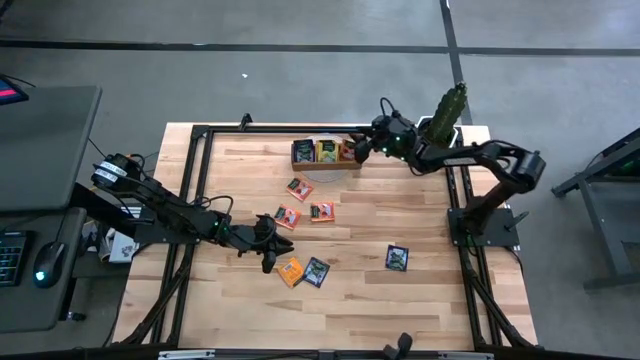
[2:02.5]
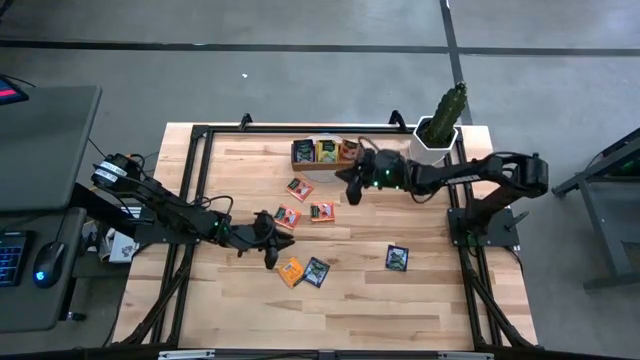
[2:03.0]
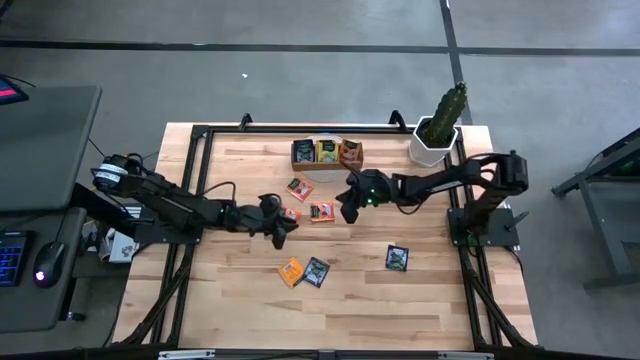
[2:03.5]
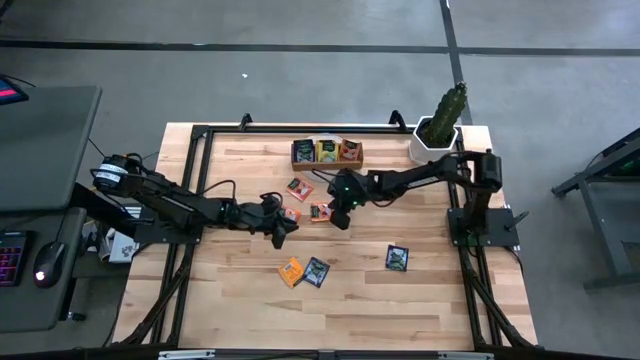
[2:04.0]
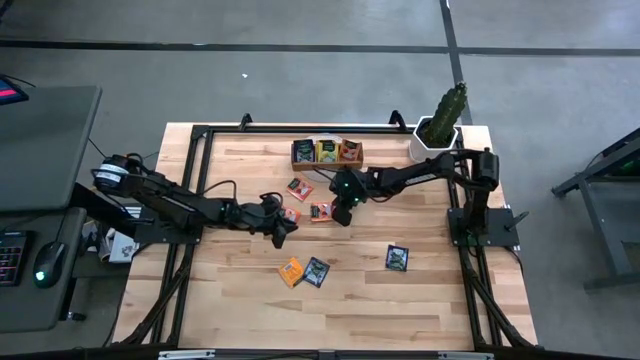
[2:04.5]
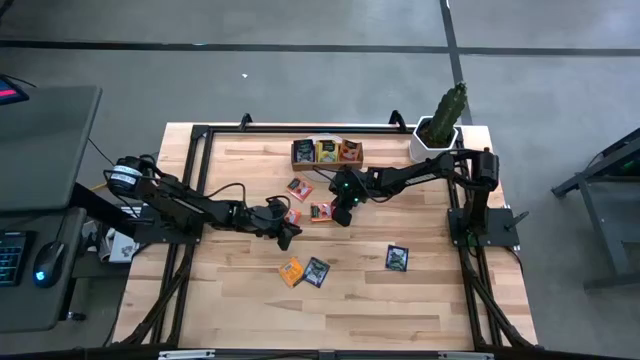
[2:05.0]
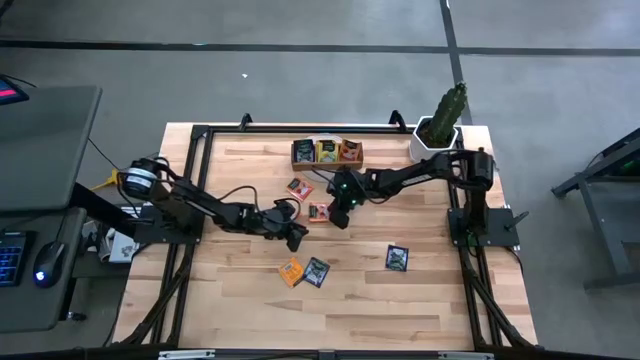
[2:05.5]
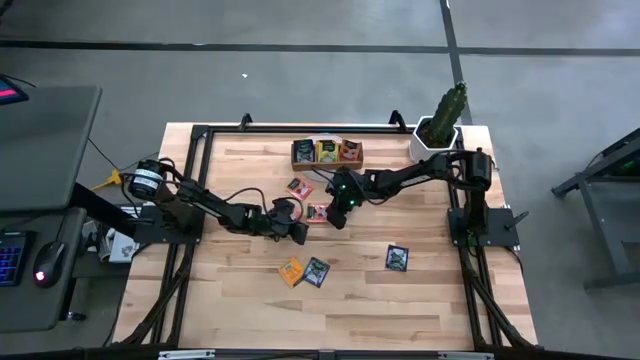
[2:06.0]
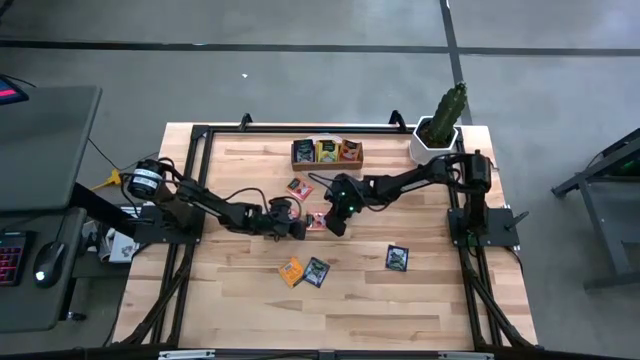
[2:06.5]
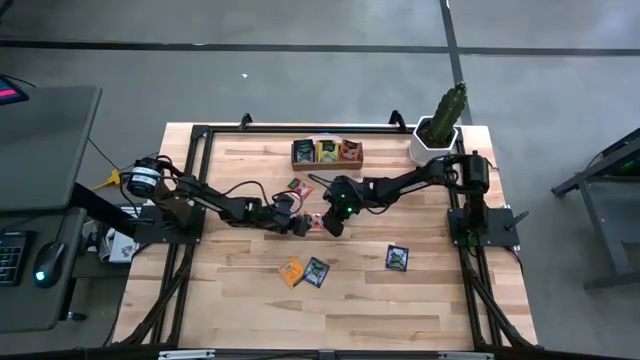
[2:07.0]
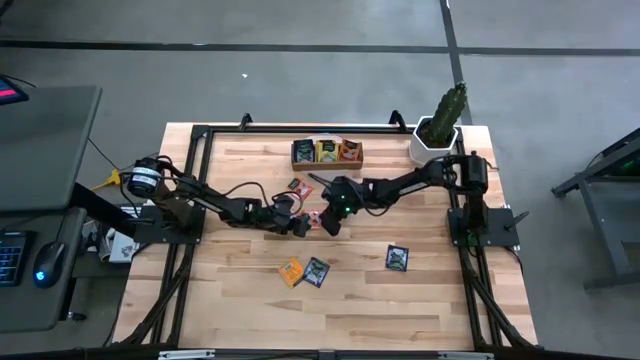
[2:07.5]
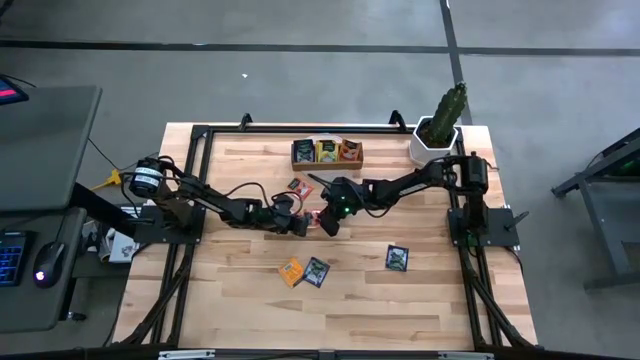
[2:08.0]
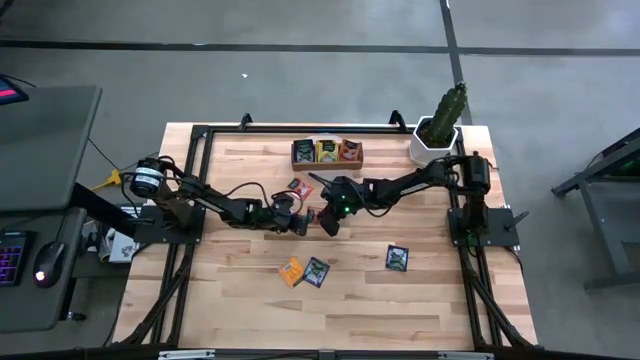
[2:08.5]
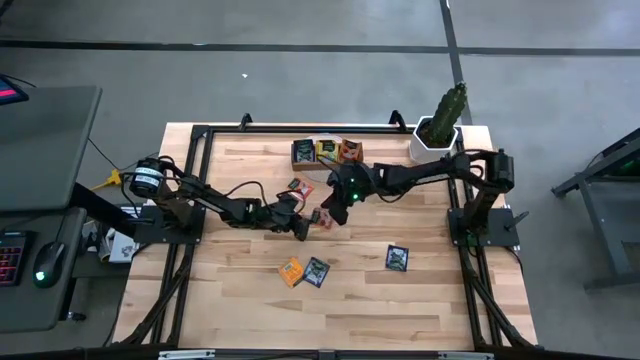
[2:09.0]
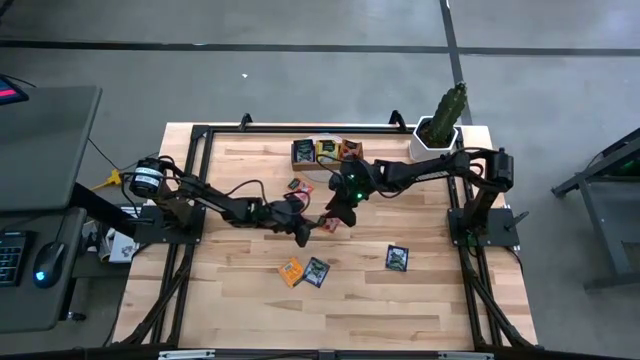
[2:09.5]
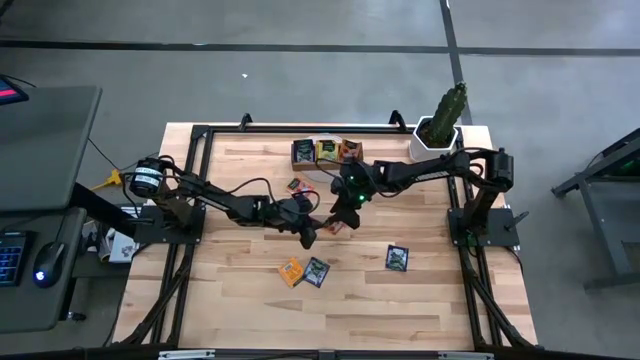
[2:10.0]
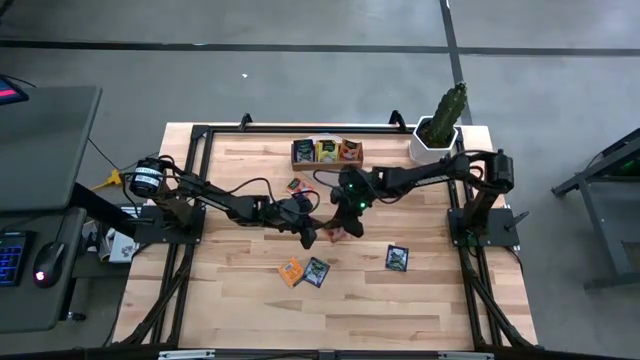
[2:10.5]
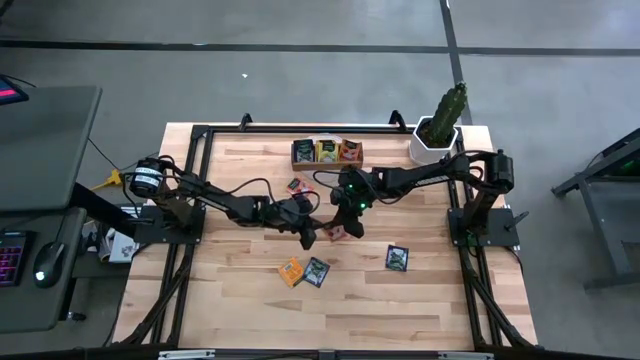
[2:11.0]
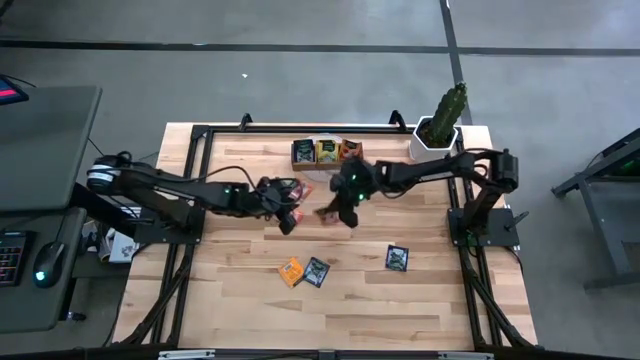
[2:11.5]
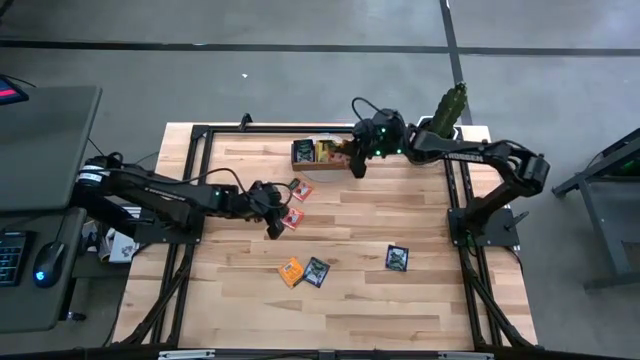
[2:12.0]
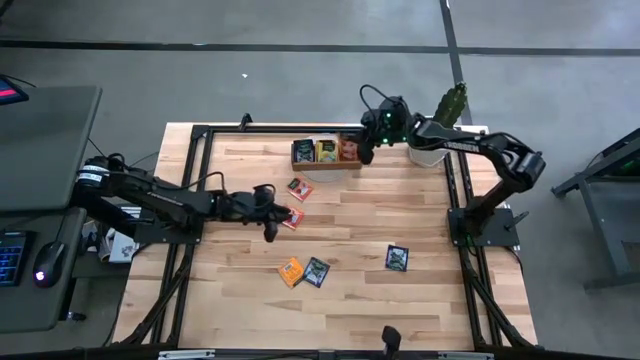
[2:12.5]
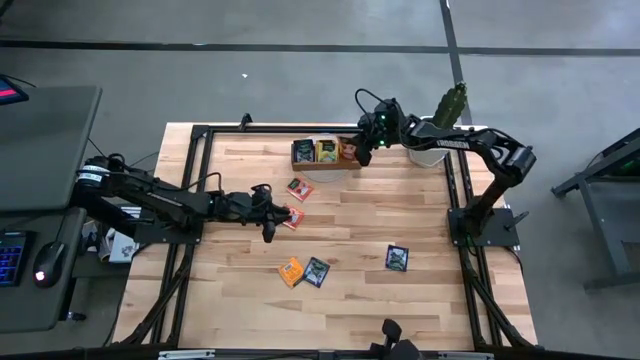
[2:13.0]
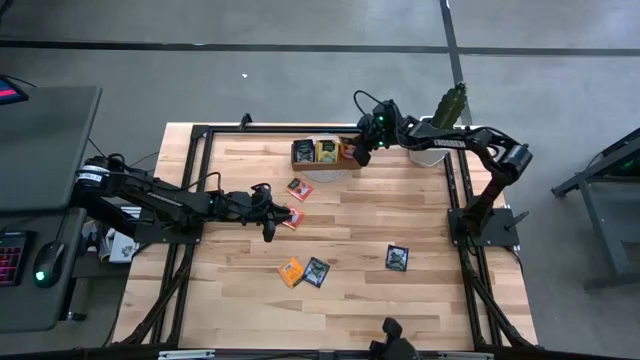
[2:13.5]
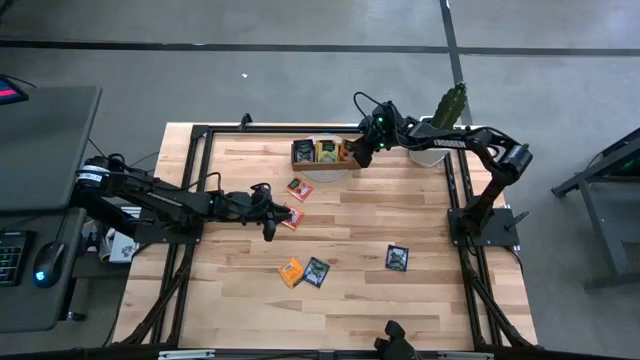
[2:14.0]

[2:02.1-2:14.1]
Task: Pick & Place Tea
Put the orange tea sachet in the right of the organizer

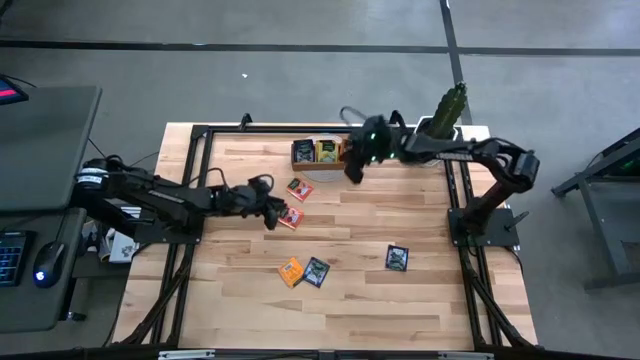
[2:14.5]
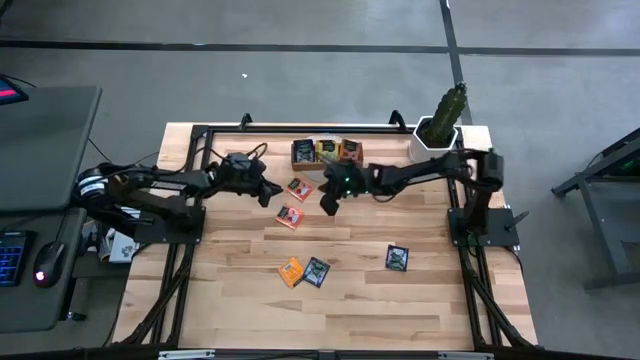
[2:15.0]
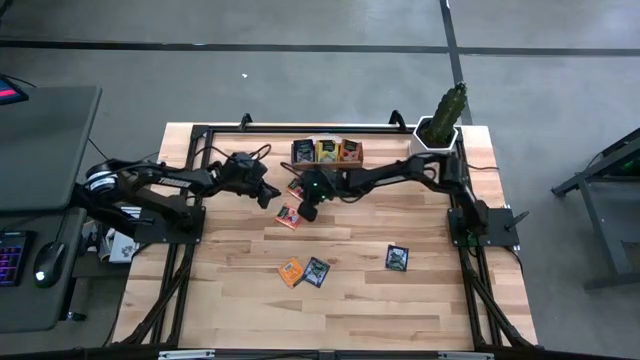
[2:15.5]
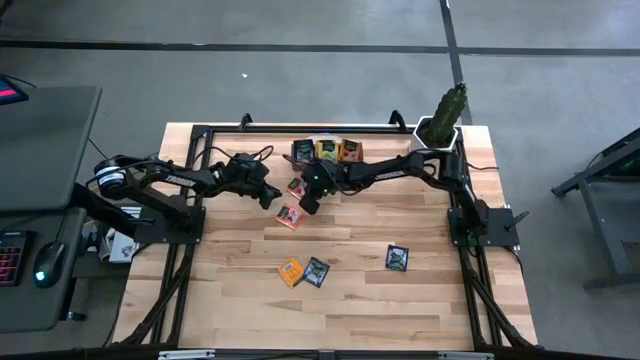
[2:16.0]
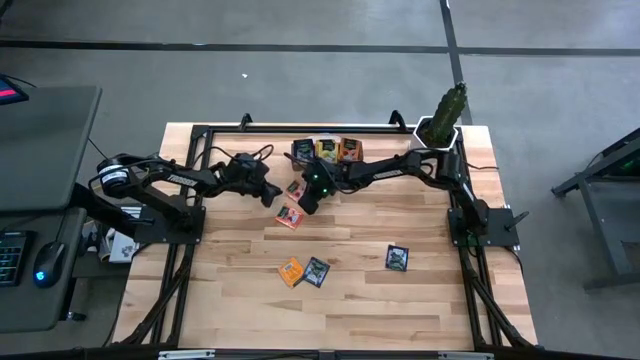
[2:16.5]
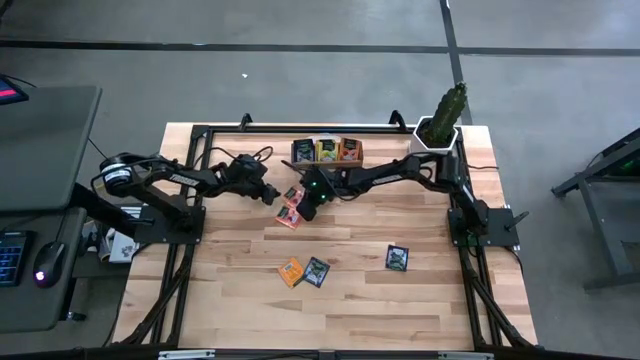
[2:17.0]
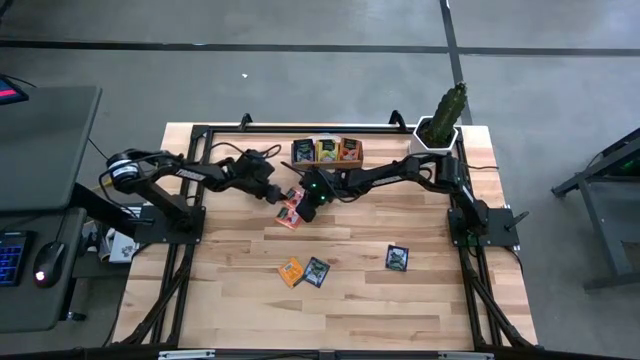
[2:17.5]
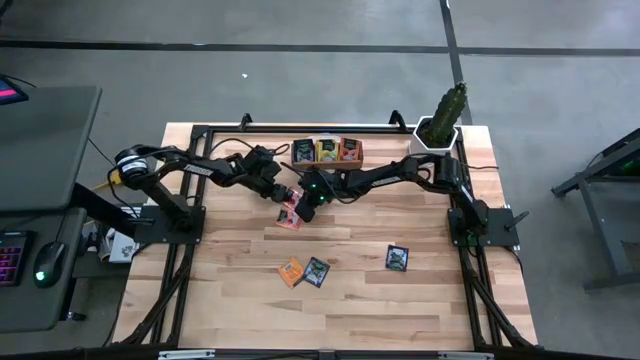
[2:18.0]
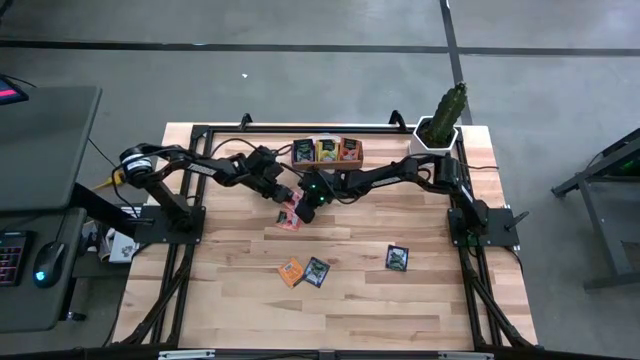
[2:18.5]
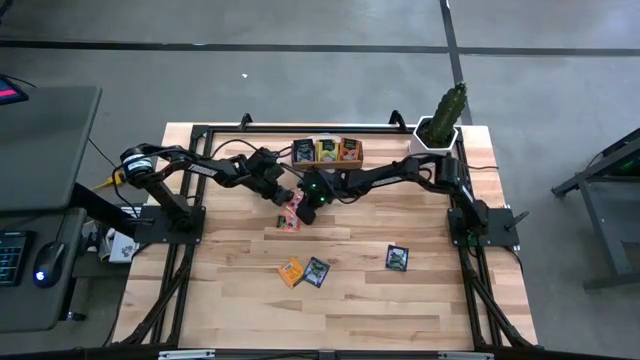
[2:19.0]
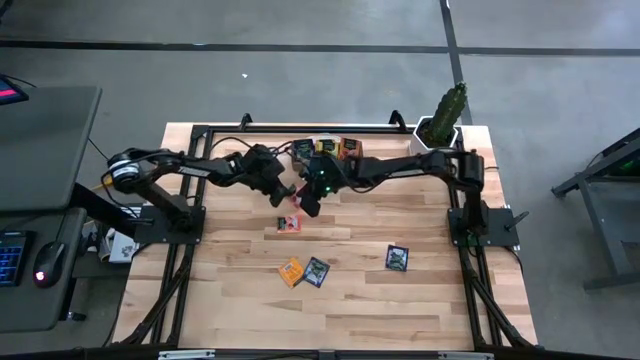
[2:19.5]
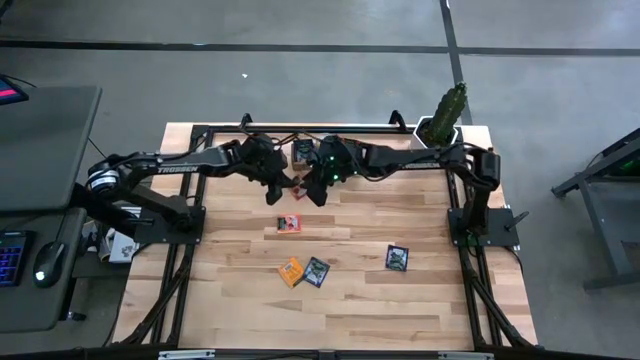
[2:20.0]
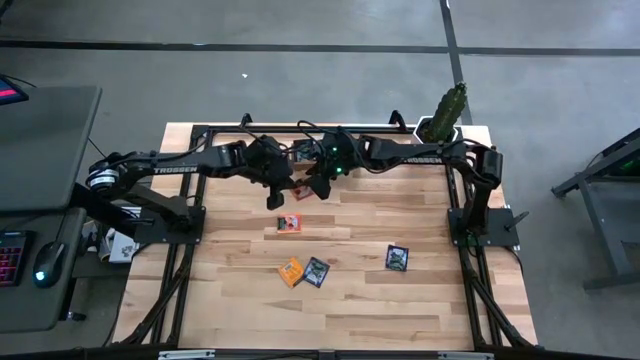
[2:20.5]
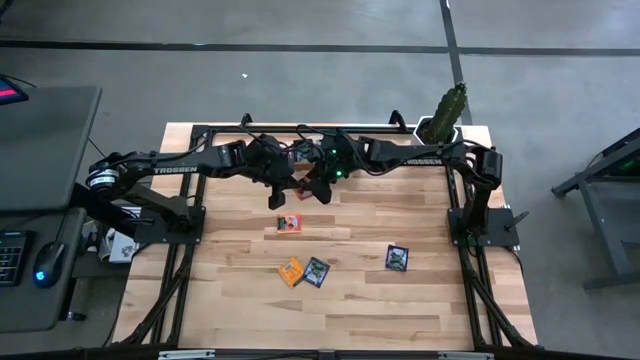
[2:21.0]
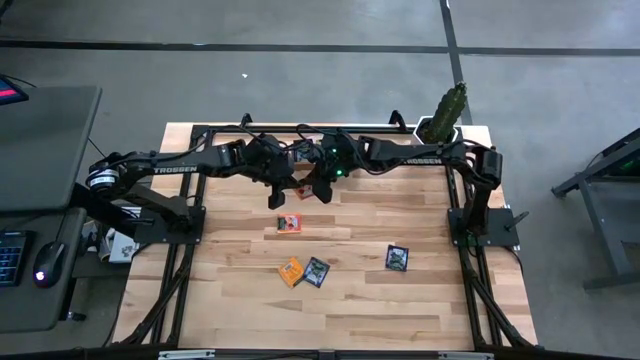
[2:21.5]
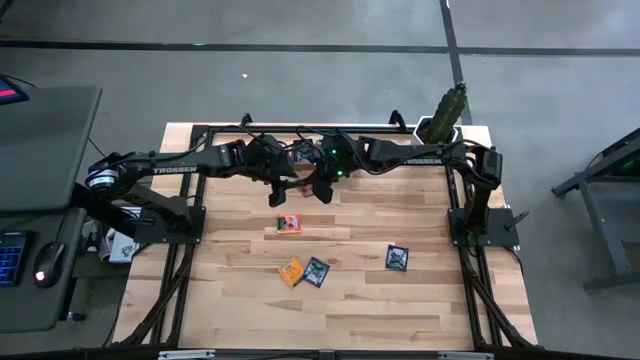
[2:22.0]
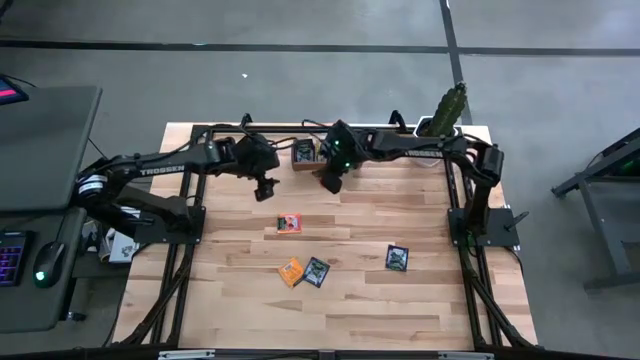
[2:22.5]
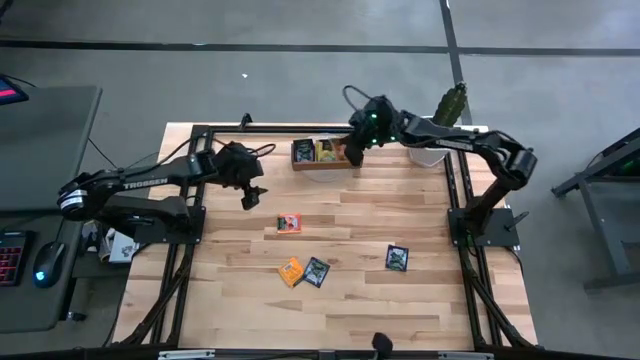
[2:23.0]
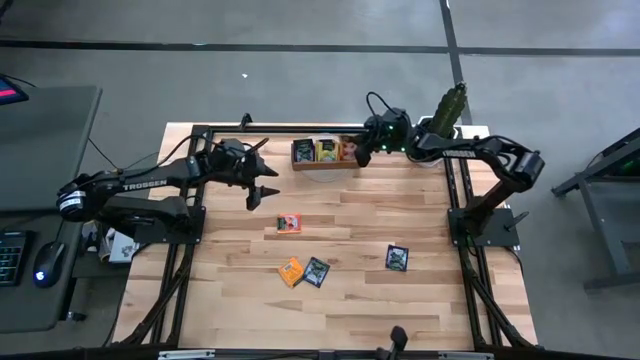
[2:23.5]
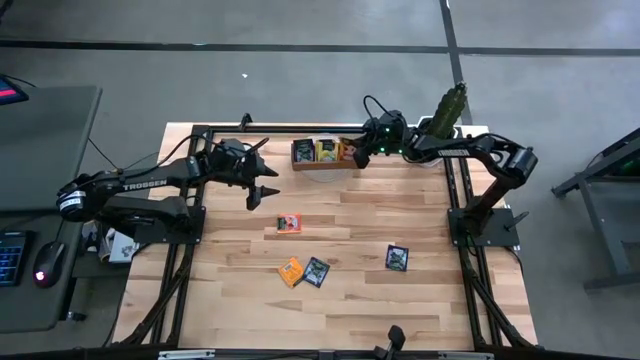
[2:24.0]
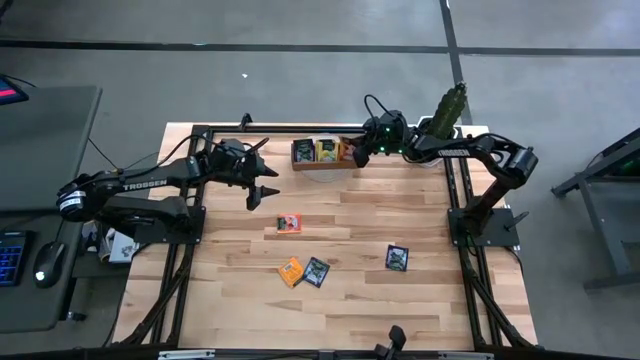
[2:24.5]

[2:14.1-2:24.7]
Put the top orange tea bag in the right compartment of the organizer
